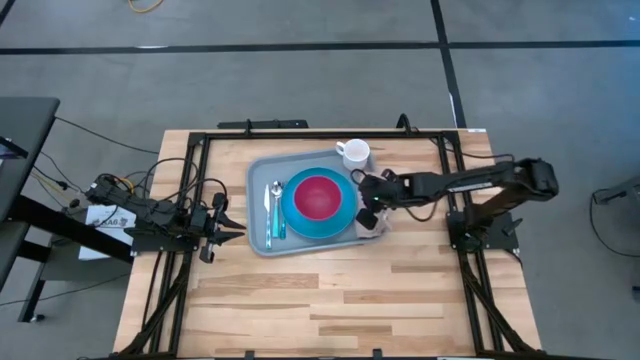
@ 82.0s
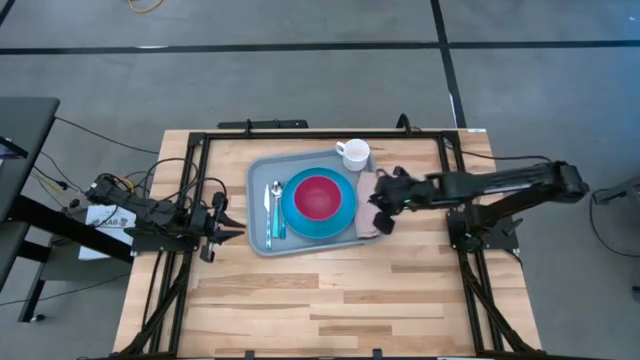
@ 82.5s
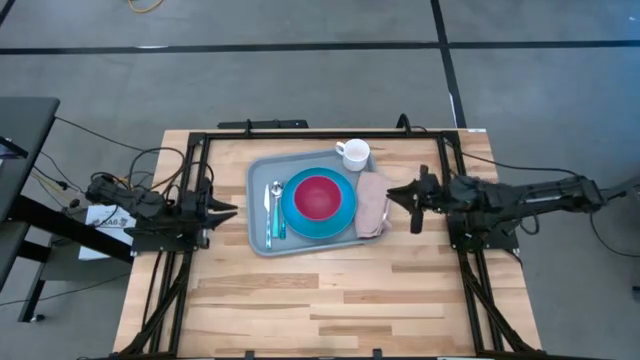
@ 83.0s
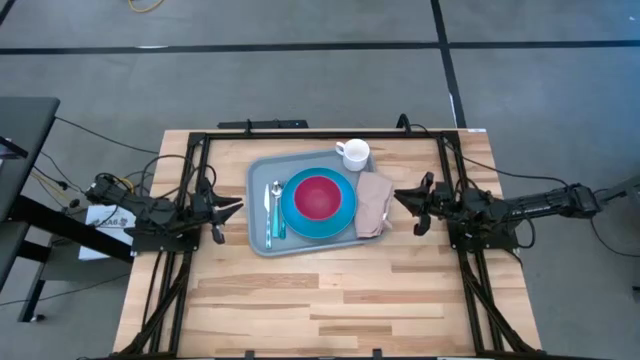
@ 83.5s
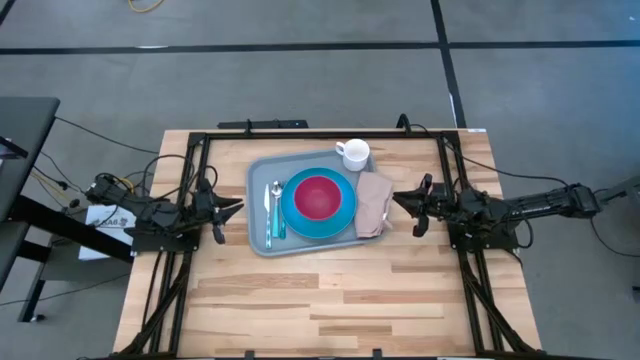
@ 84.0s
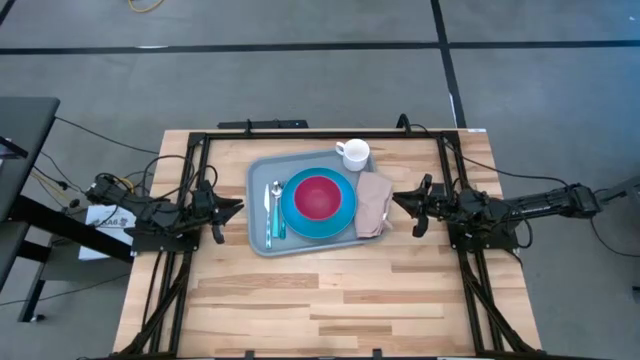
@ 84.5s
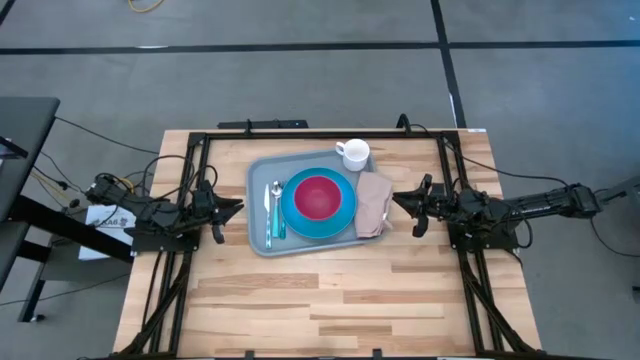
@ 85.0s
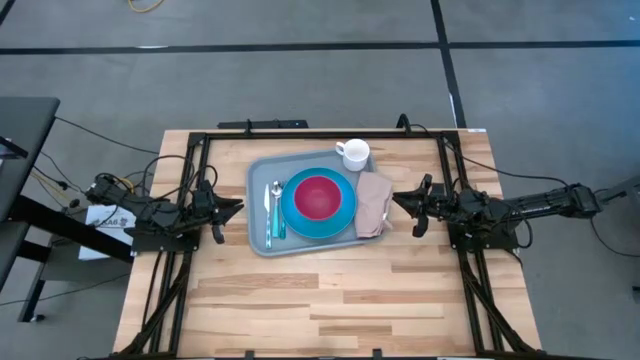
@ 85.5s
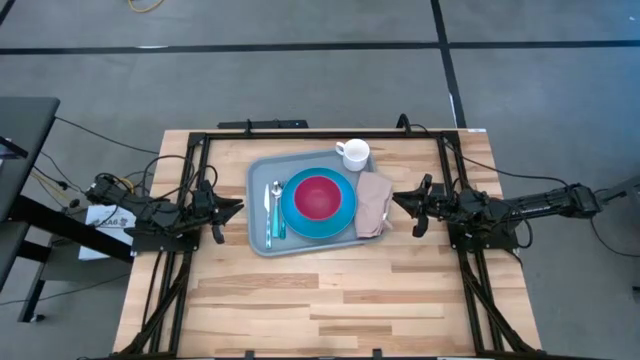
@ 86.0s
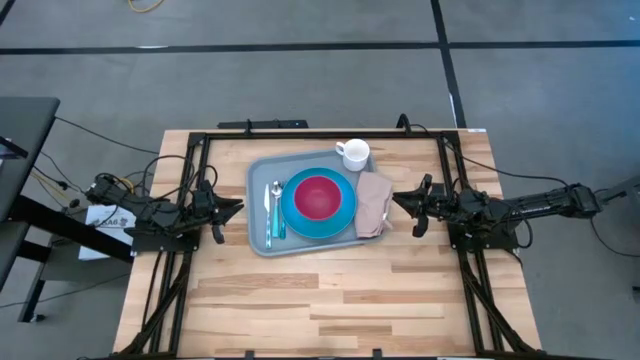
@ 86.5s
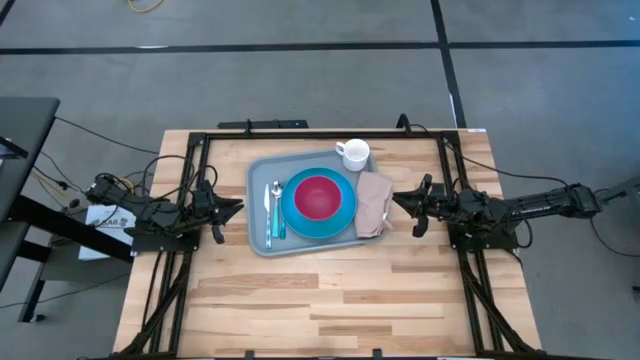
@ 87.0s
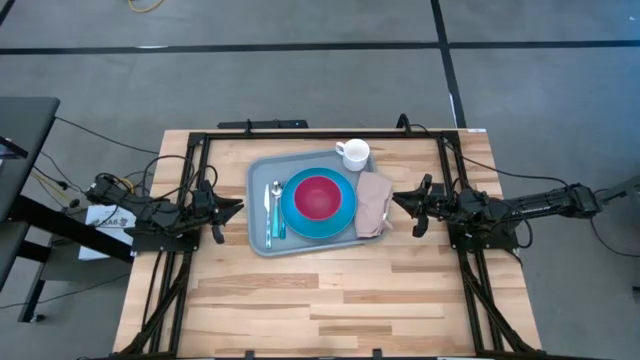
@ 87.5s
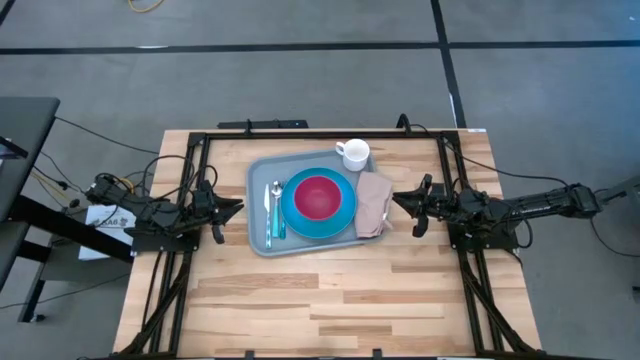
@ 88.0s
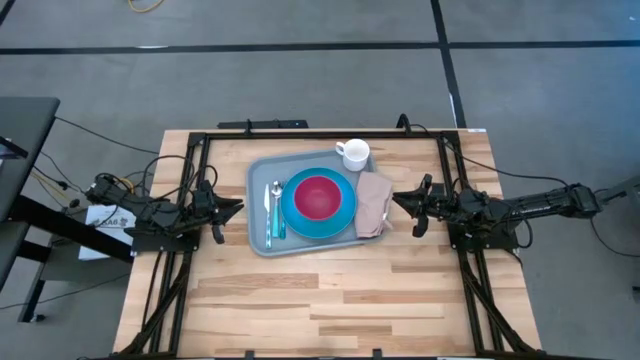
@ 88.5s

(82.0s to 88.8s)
Task: Set up tray
Return to Home Position

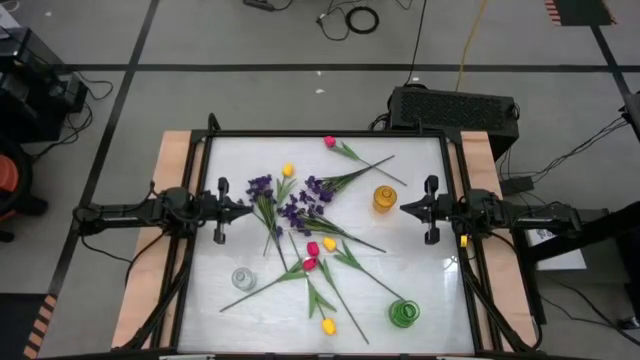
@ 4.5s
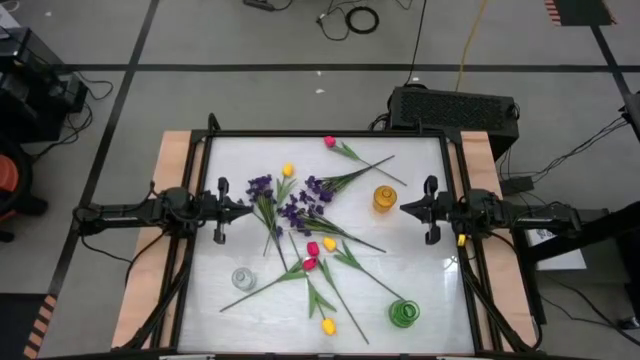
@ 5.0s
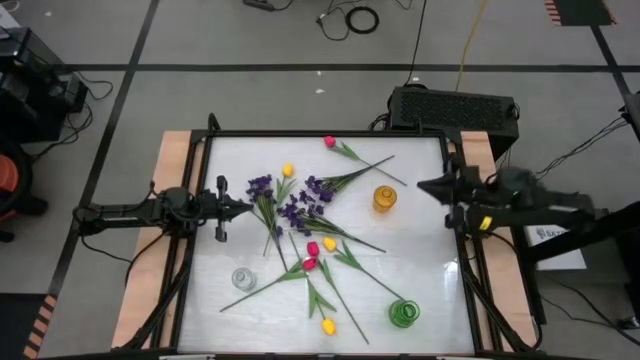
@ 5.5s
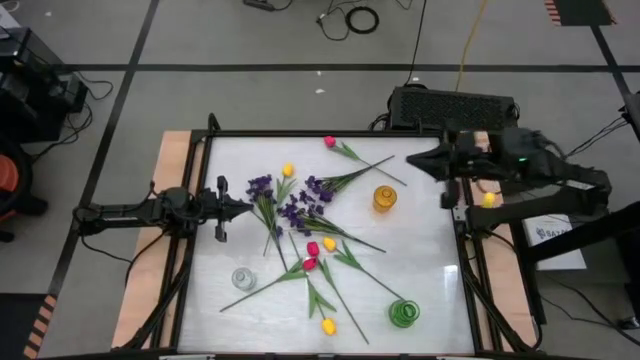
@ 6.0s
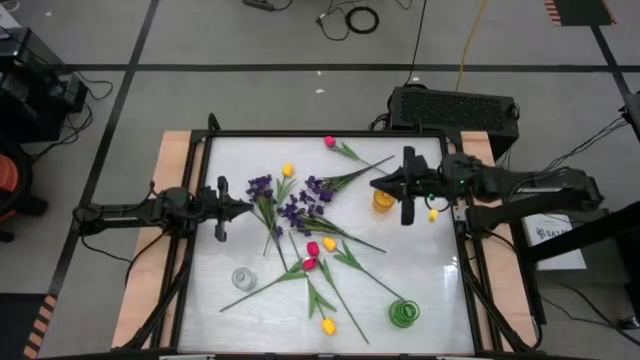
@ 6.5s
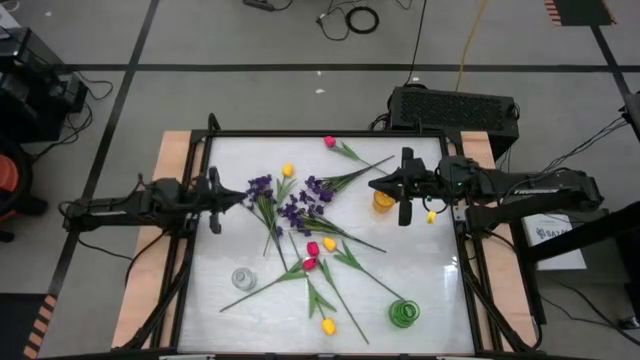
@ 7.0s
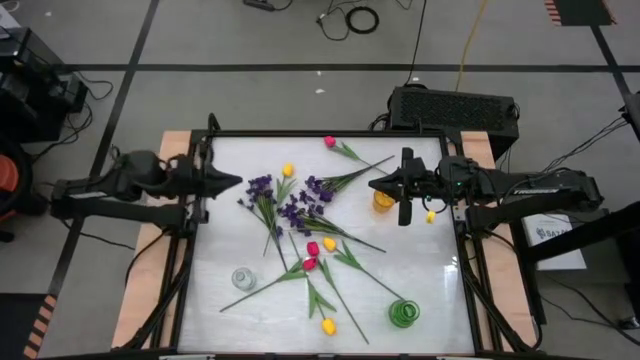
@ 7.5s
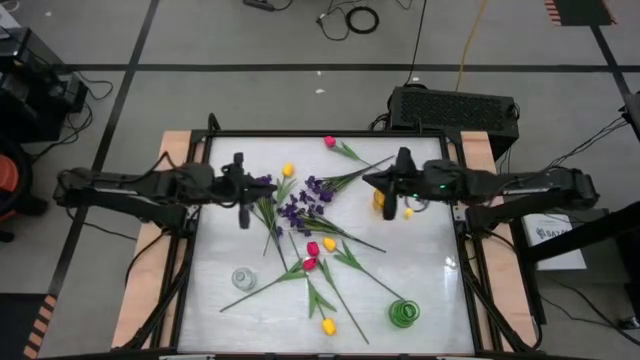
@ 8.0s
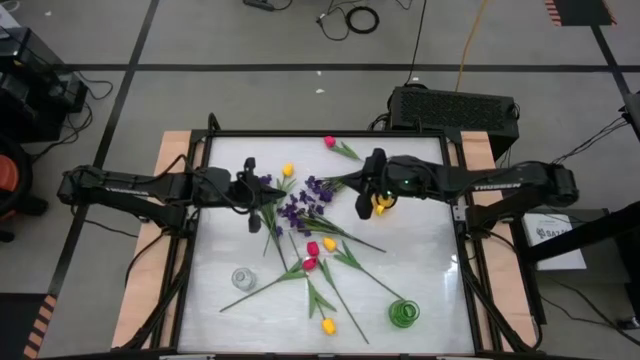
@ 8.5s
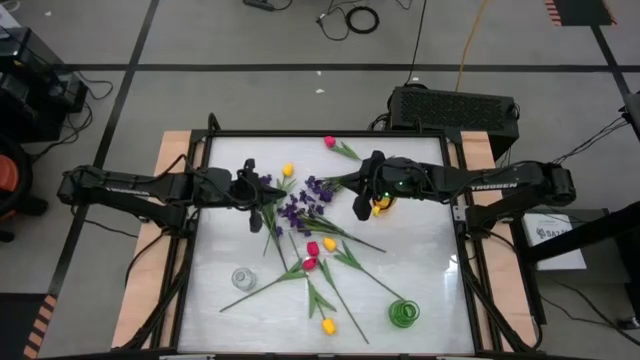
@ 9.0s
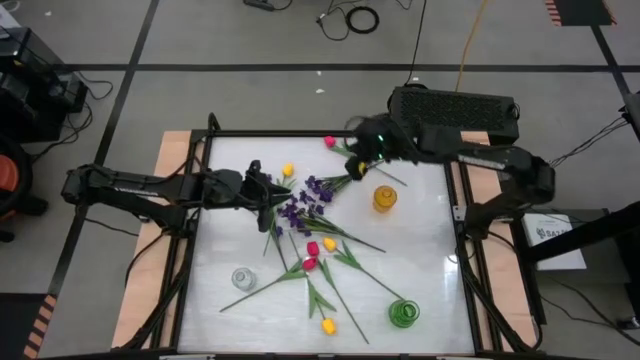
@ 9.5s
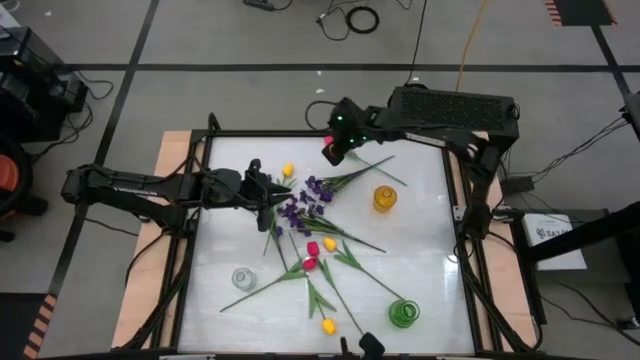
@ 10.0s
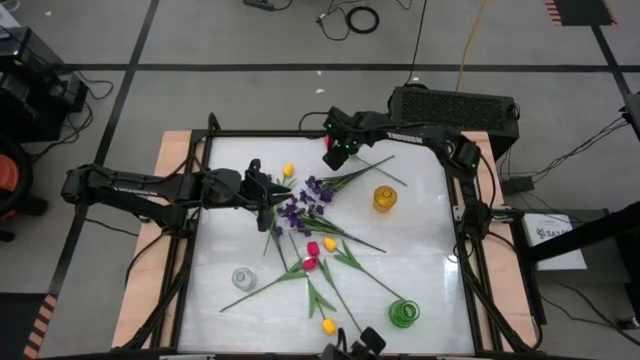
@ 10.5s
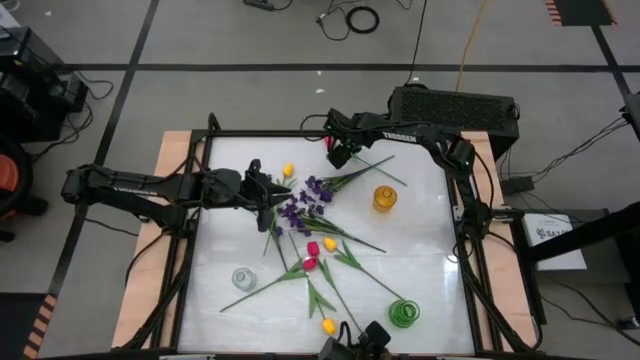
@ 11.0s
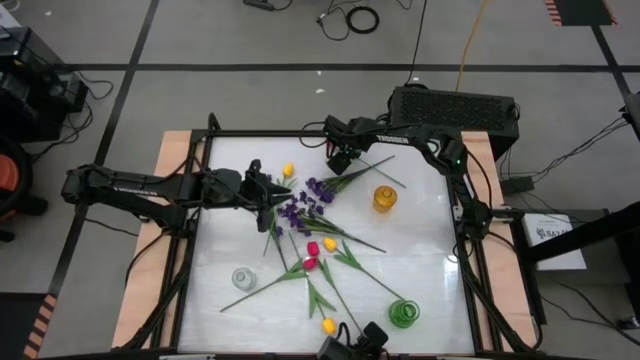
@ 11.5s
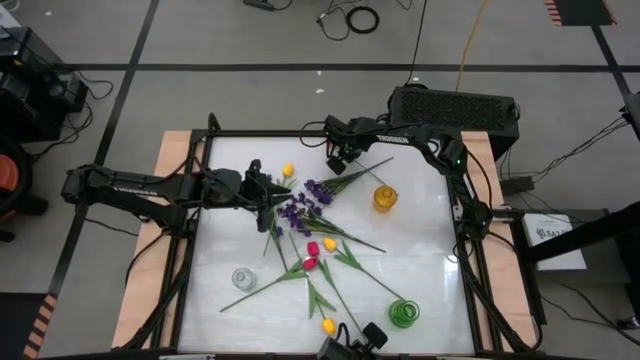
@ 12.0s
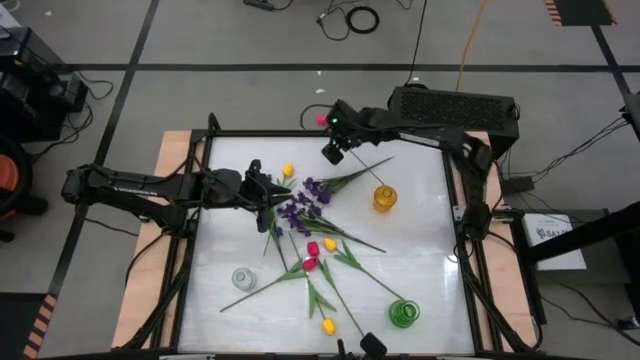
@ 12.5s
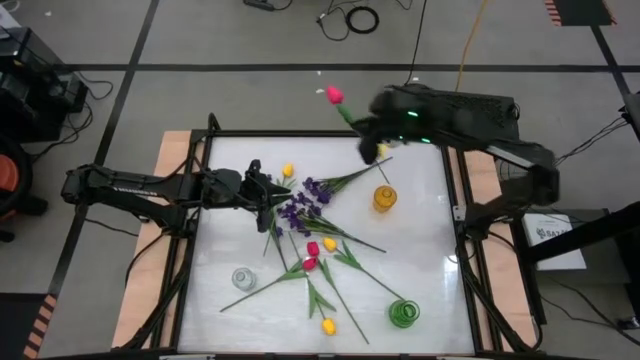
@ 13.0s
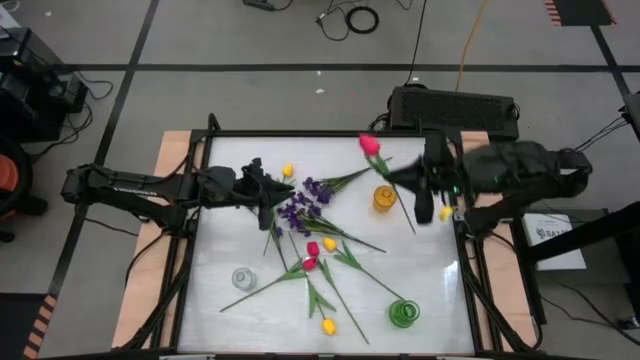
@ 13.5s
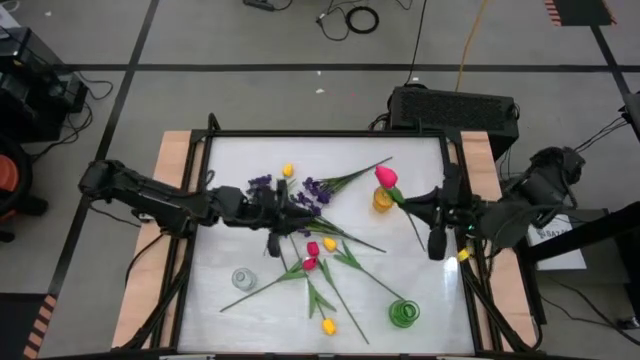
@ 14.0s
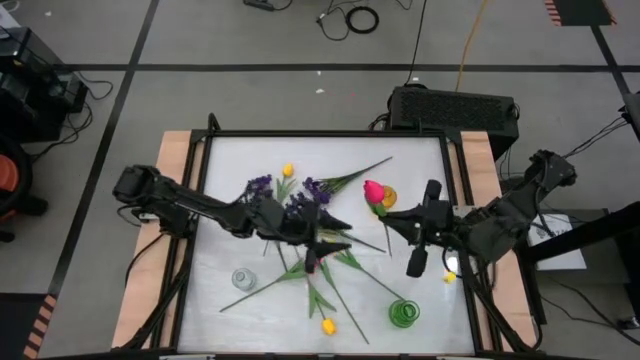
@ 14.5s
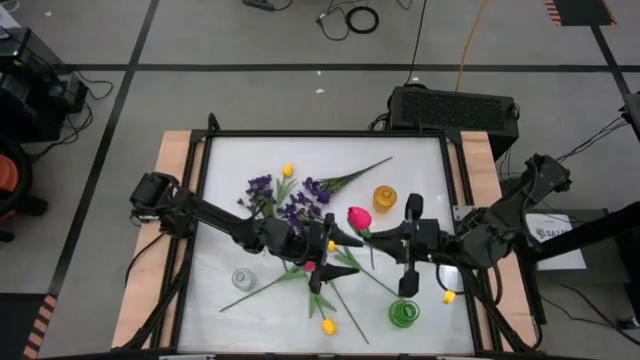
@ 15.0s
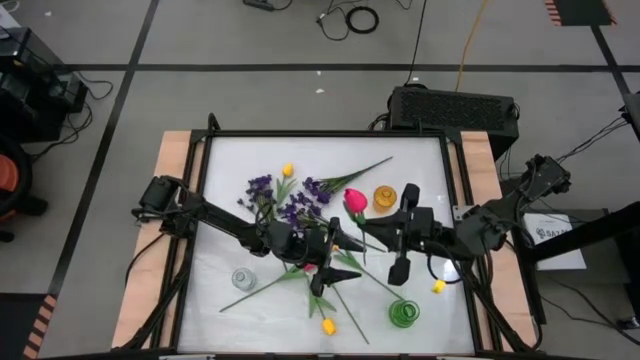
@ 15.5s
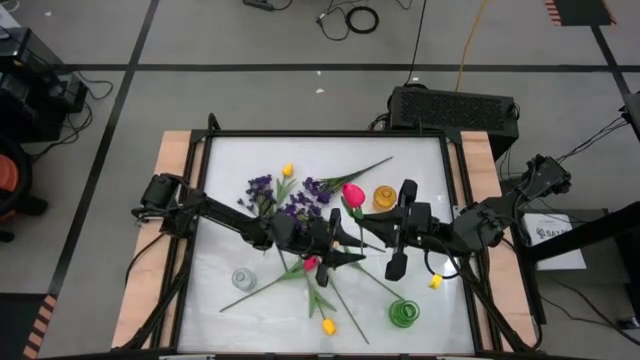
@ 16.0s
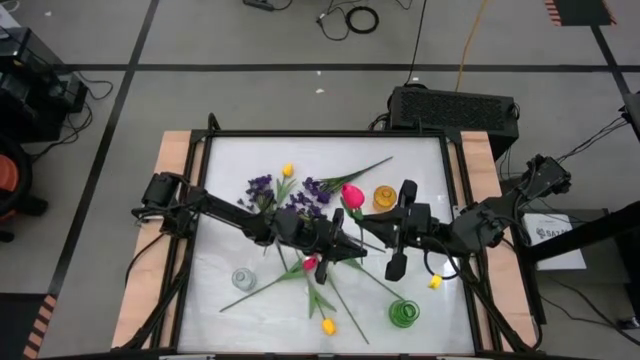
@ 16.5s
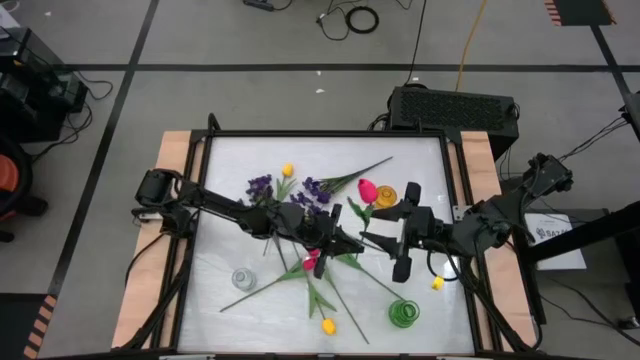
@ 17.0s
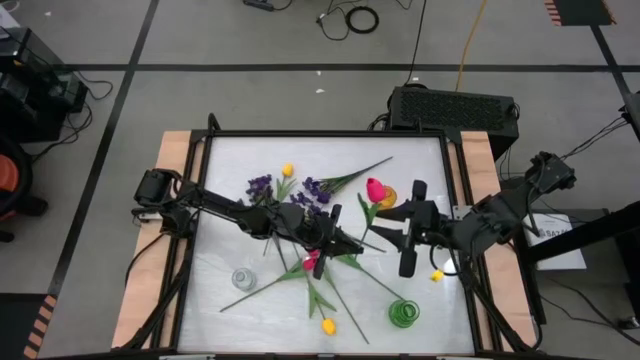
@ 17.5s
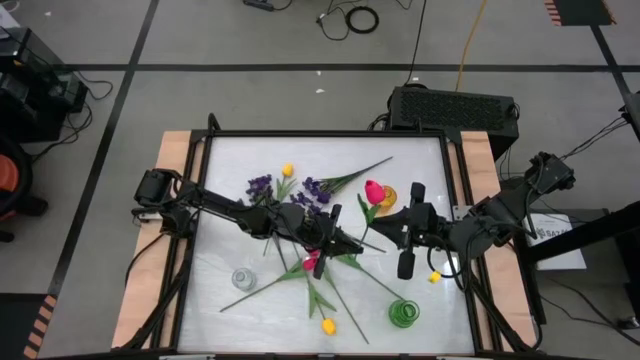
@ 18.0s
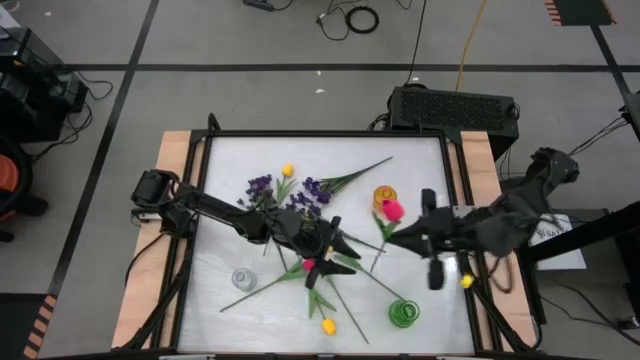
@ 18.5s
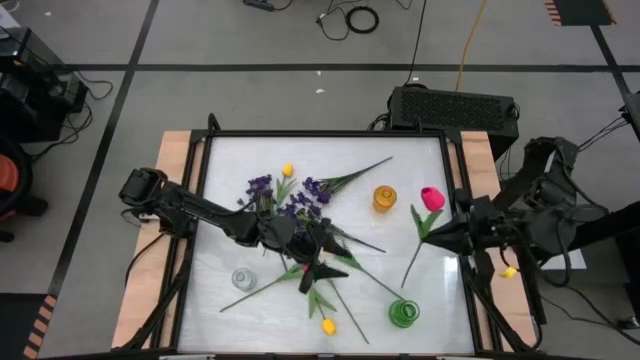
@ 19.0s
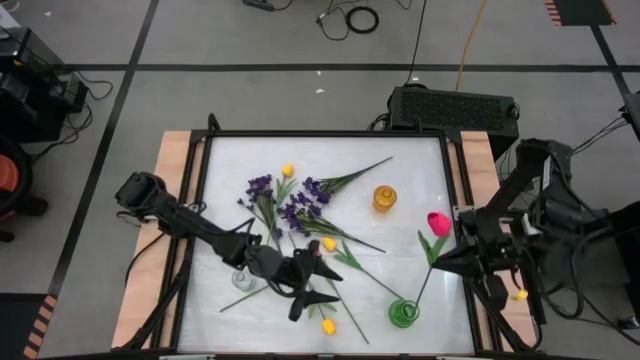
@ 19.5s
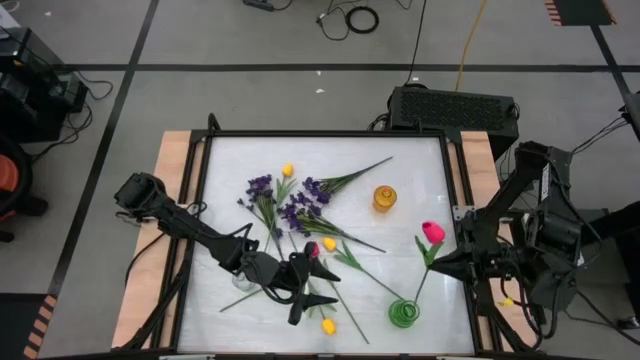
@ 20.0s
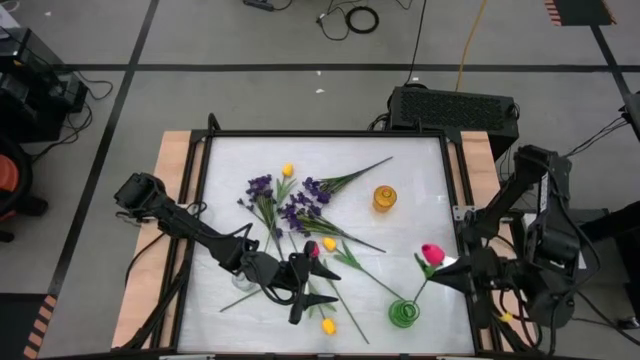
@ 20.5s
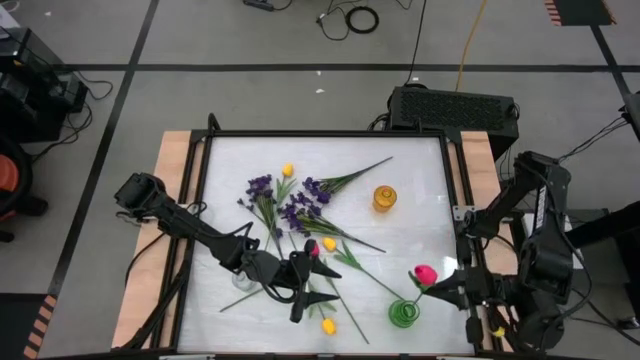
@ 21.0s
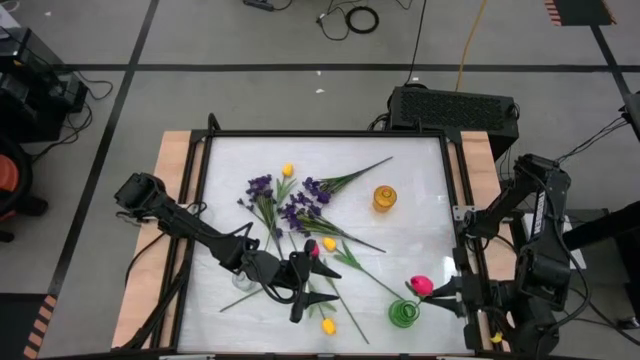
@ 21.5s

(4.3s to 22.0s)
Task: Sort flowers into vase by color
Put the top right red flower into the green vase
